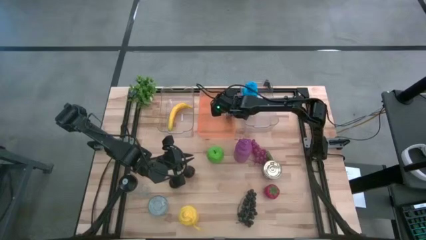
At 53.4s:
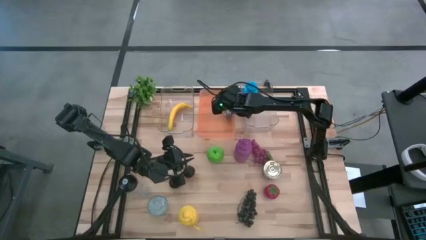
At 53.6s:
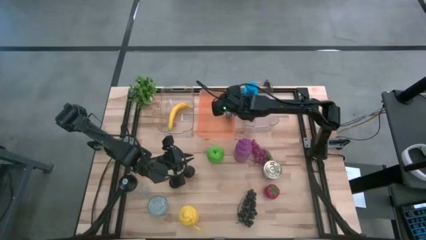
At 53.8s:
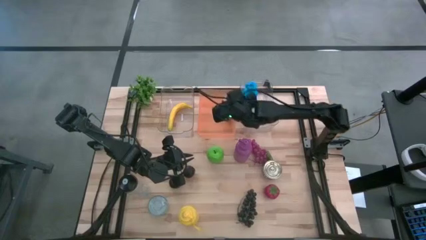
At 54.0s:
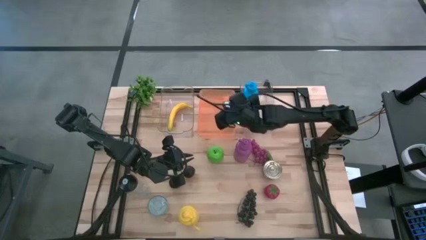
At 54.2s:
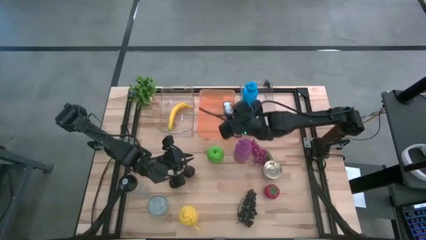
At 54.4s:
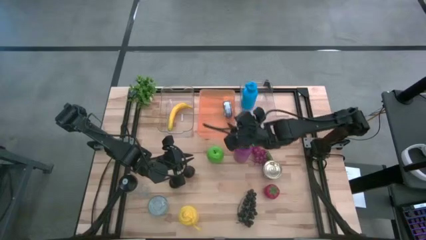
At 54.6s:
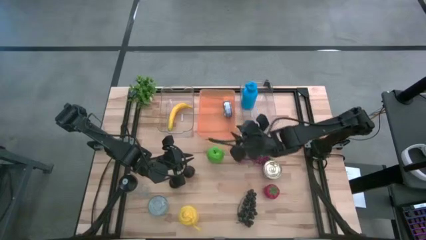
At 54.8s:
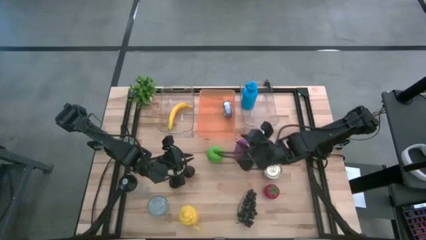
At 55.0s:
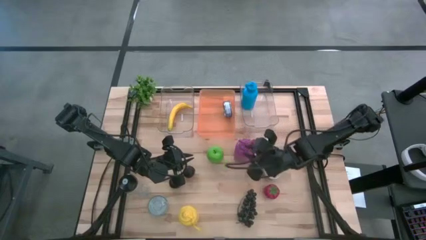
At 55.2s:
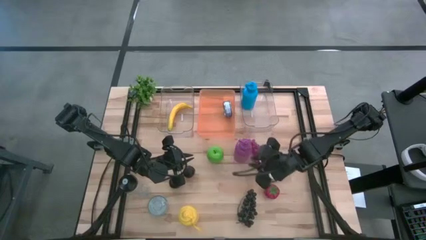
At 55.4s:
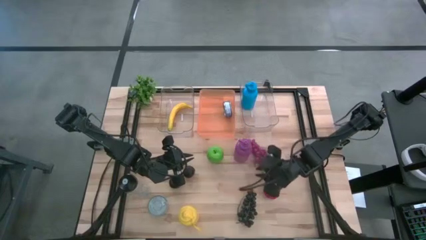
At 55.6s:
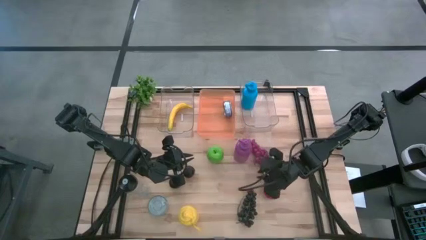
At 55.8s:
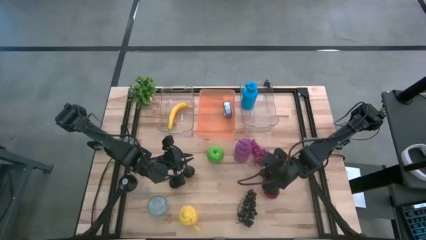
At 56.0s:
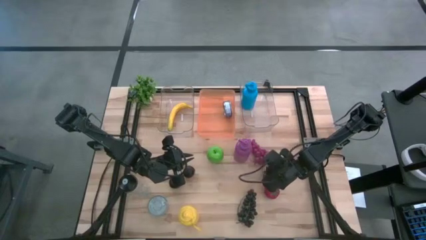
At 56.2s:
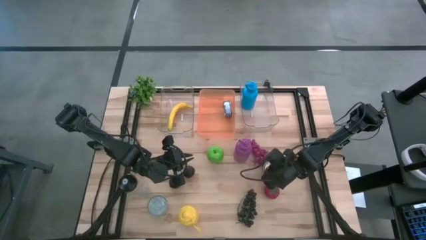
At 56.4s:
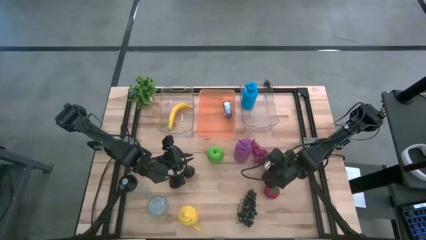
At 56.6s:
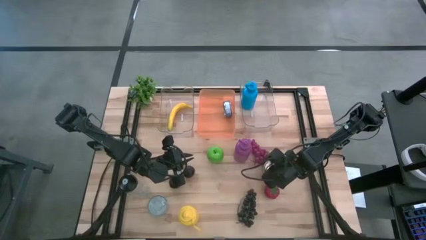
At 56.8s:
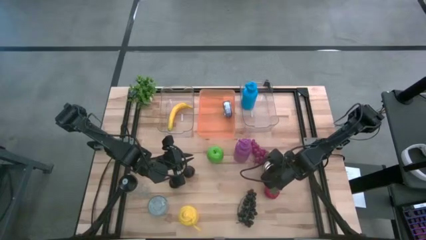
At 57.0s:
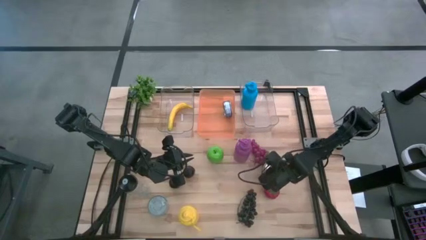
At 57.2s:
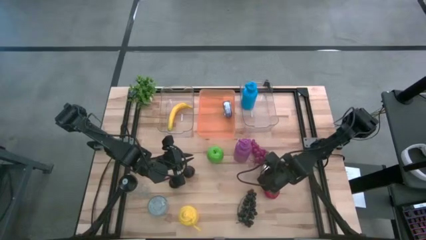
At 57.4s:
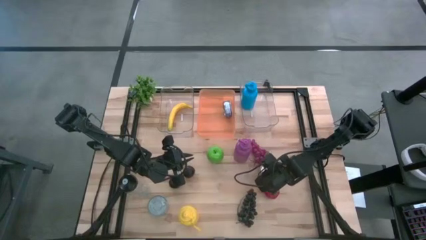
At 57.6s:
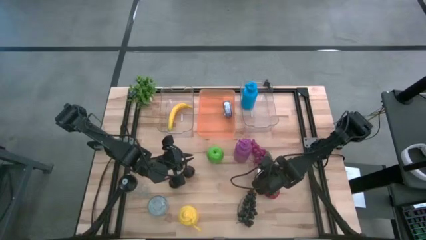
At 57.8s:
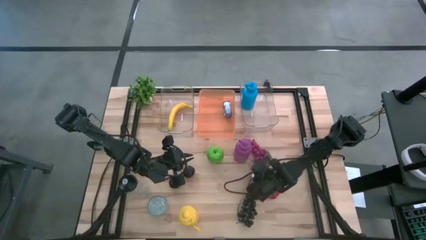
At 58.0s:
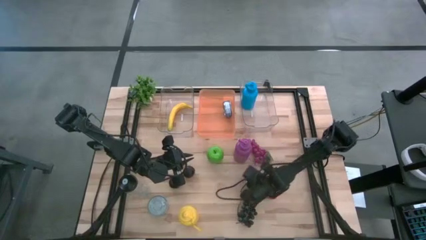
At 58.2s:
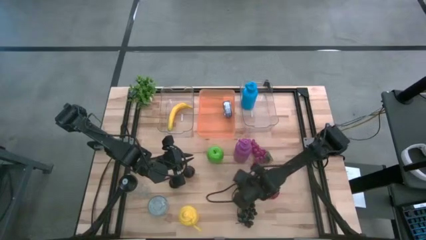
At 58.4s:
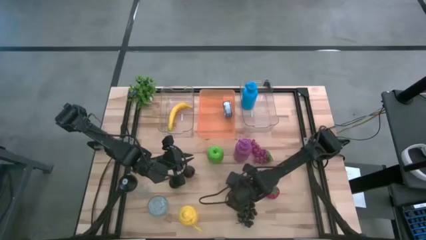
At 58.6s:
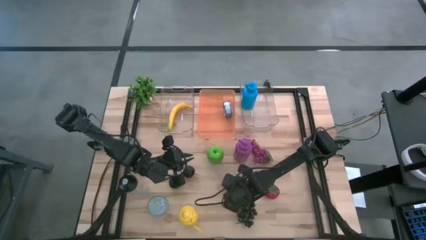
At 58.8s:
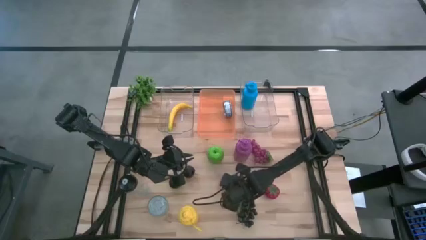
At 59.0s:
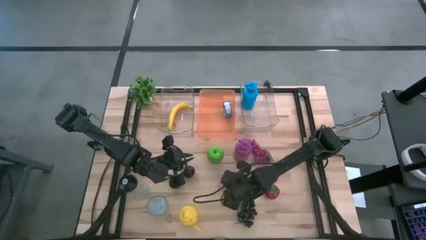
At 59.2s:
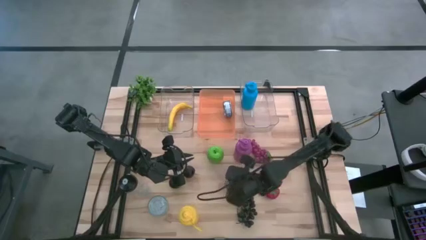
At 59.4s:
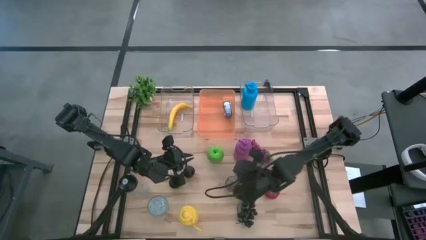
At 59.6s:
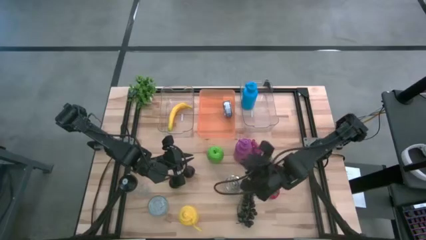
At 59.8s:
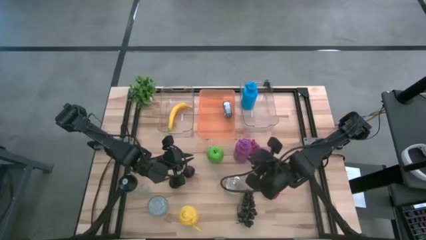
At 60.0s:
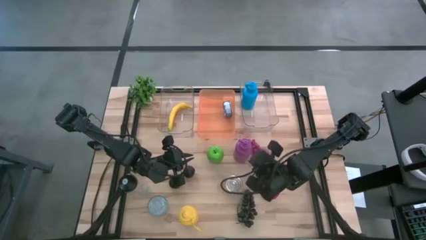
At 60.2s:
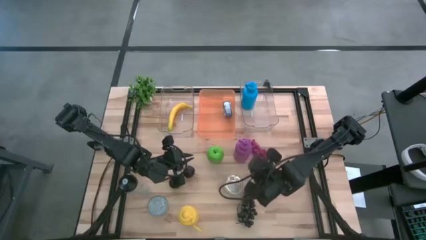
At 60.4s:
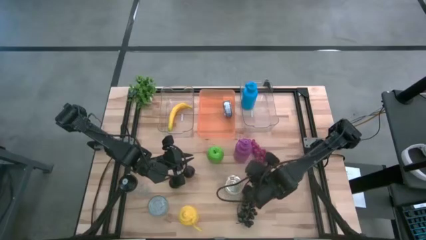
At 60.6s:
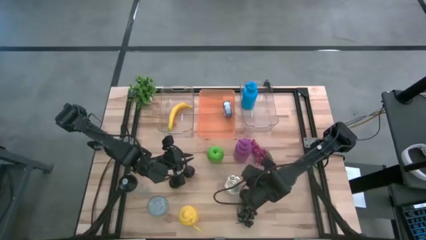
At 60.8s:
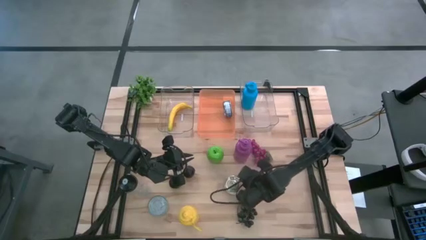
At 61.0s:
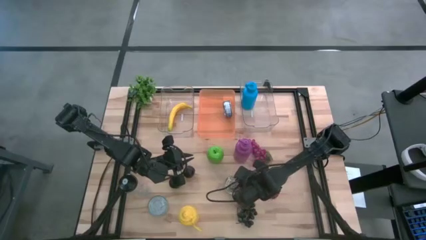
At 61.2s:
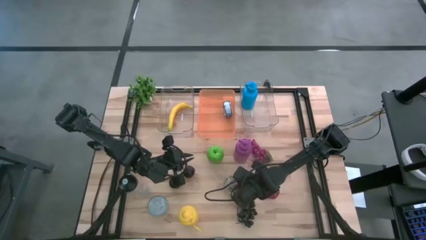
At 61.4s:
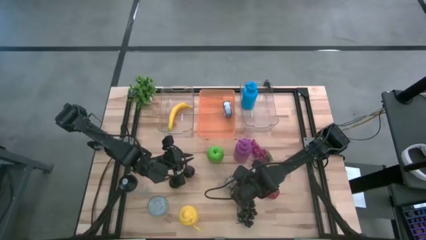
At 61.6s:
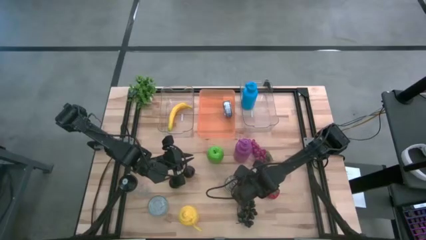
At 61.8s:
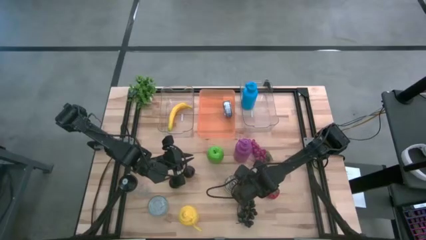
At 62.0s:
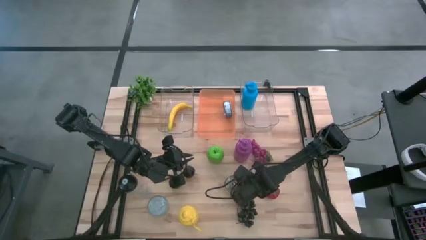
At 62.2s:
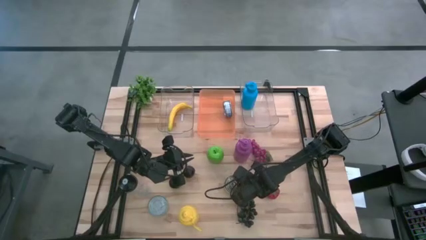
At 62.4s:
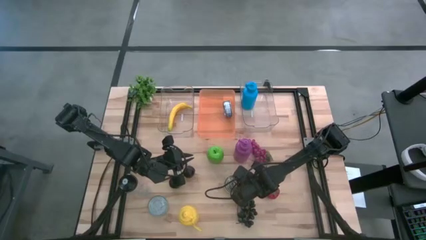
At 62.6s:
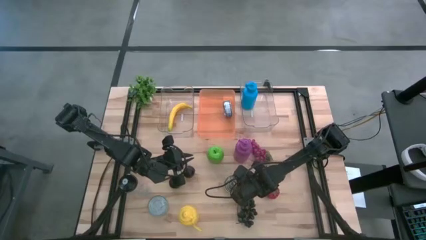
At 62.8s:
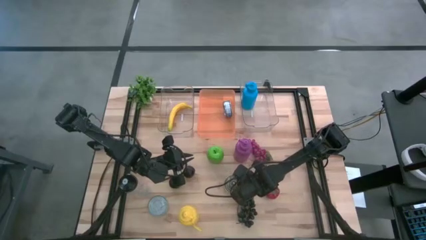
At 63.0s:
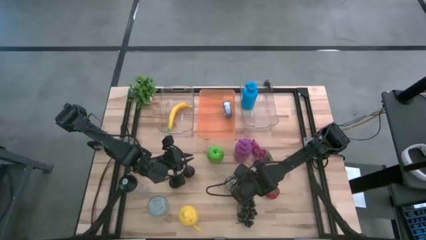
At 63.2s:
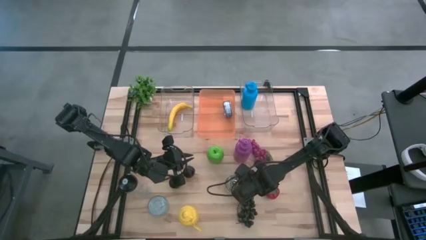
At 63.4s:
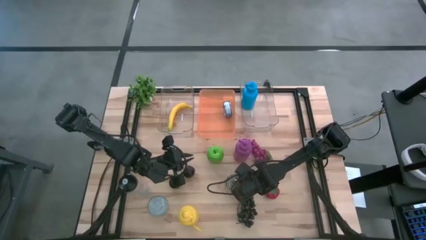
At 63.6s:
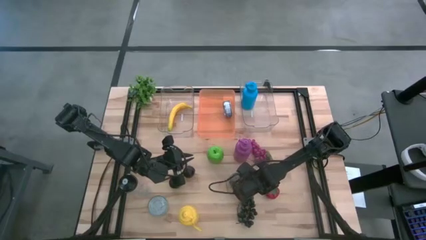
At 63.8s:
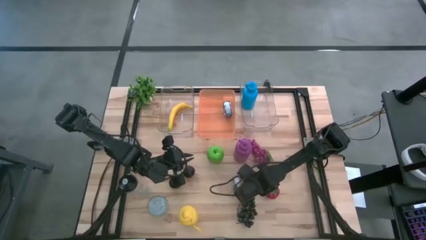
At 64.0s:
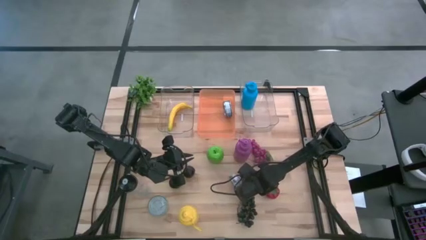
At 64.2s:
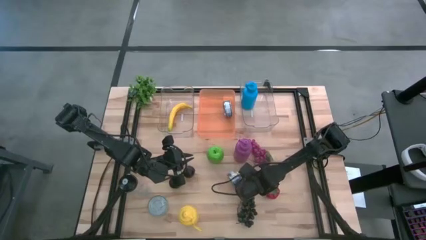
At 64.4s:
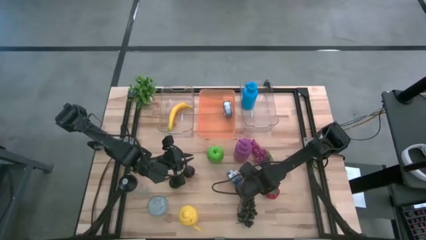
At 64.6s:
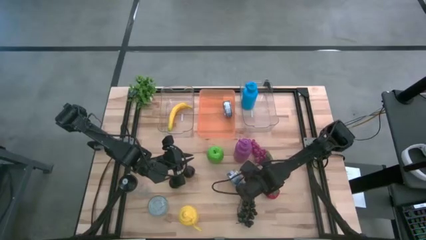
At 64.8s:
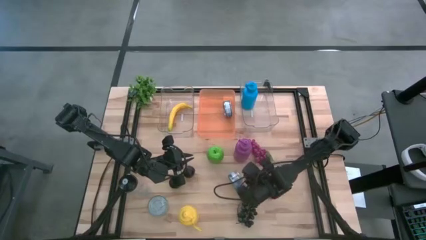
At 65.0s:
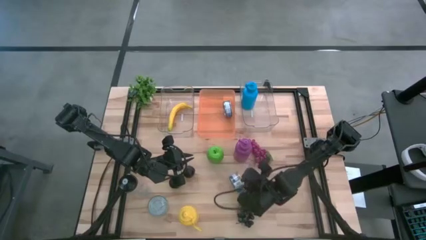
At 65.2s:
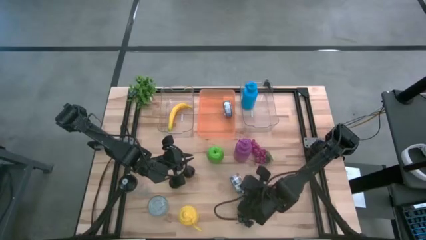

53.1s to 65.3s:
Task: Pick & Place Food Item
Put the blue and pink tuna can into the orange bin

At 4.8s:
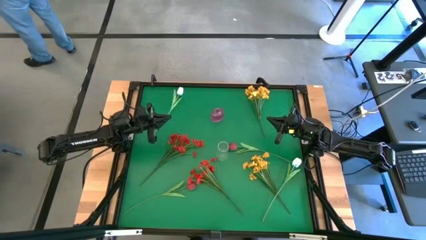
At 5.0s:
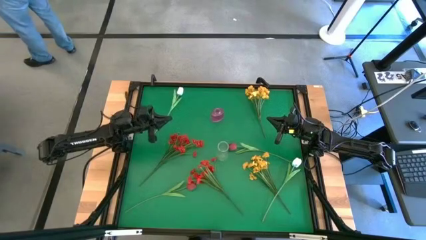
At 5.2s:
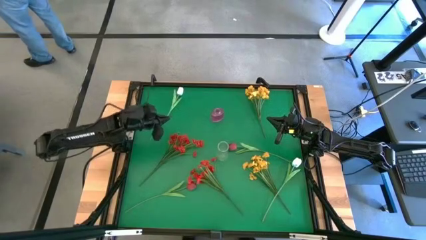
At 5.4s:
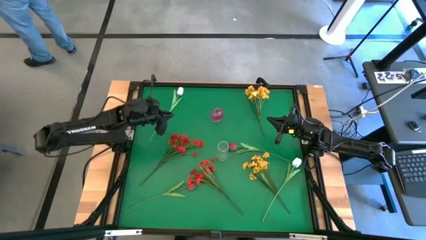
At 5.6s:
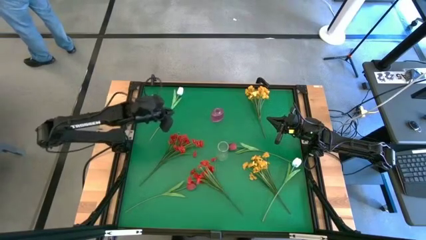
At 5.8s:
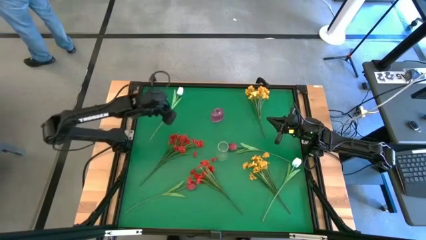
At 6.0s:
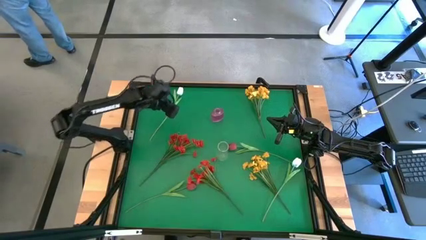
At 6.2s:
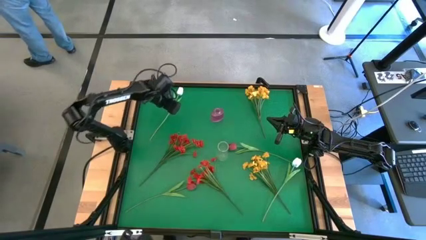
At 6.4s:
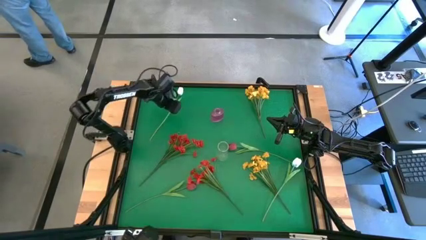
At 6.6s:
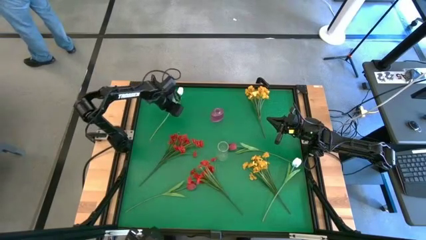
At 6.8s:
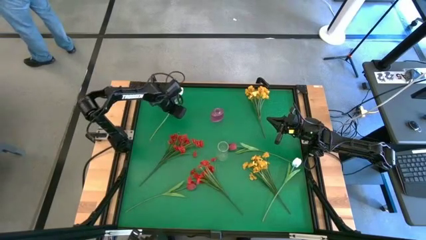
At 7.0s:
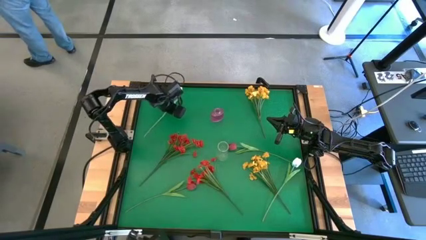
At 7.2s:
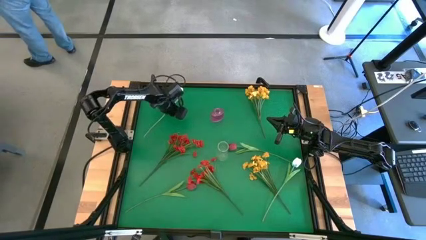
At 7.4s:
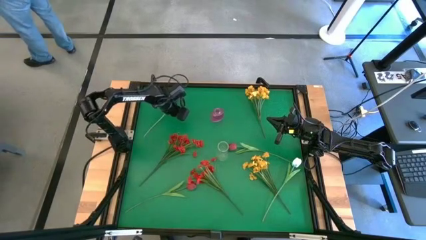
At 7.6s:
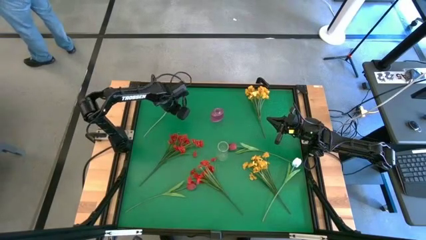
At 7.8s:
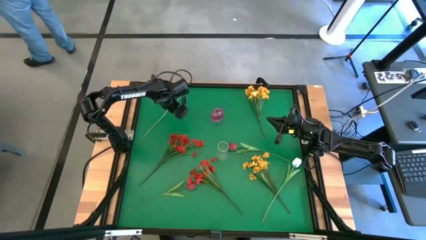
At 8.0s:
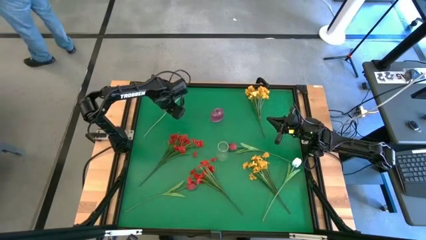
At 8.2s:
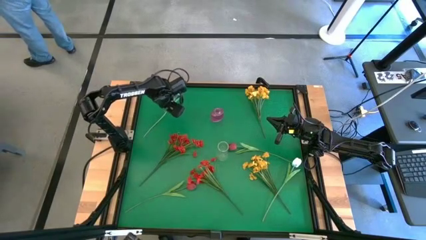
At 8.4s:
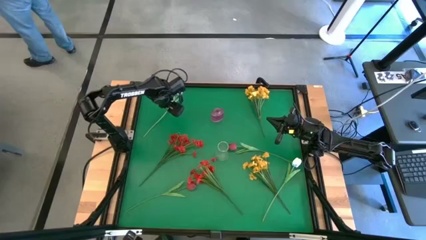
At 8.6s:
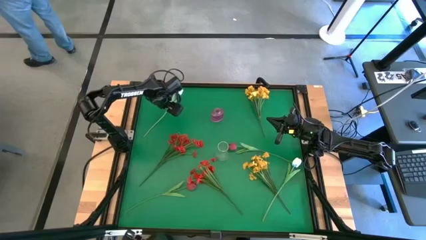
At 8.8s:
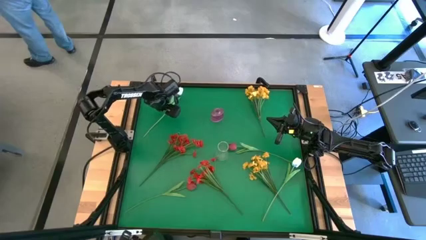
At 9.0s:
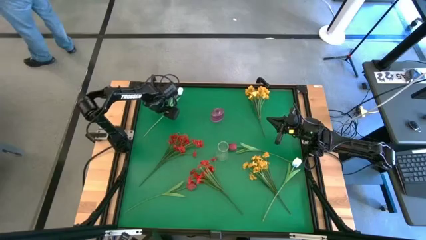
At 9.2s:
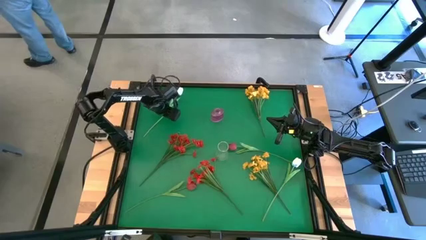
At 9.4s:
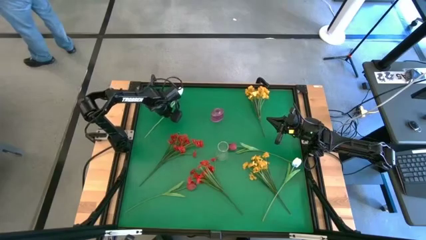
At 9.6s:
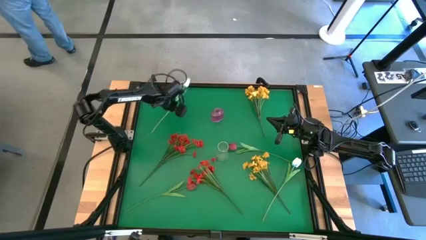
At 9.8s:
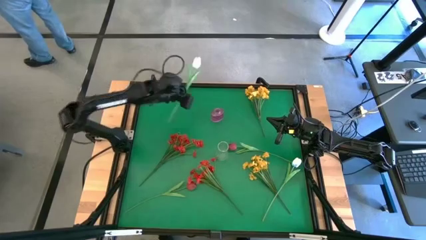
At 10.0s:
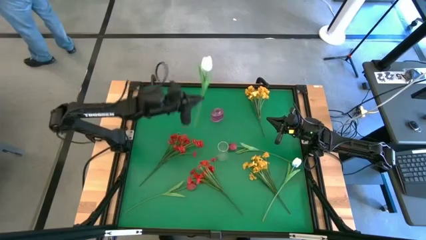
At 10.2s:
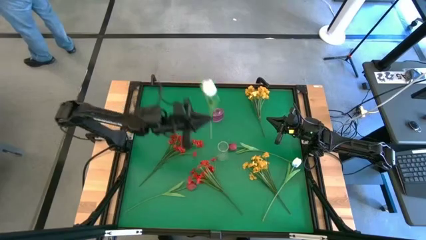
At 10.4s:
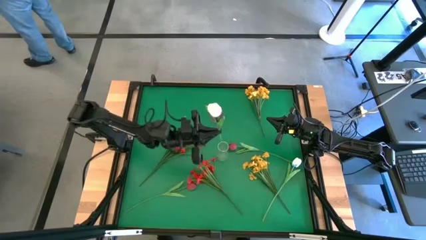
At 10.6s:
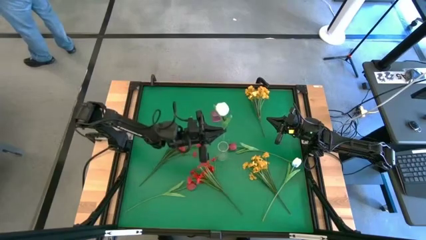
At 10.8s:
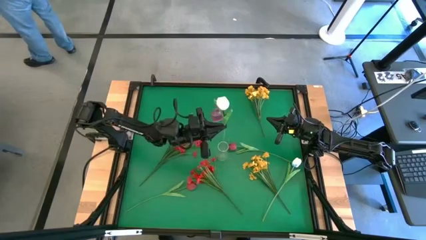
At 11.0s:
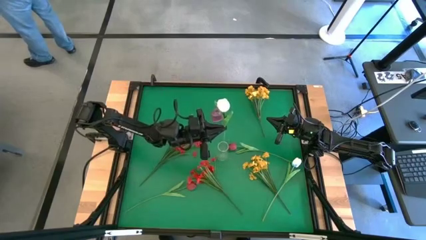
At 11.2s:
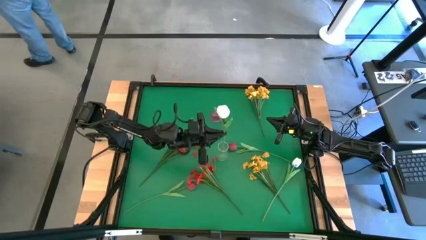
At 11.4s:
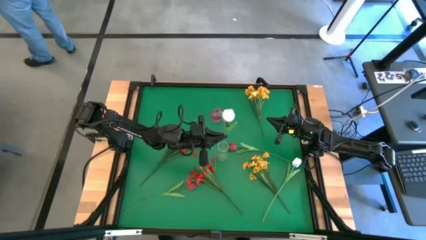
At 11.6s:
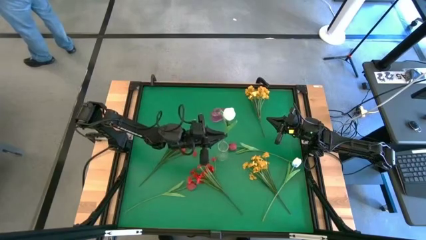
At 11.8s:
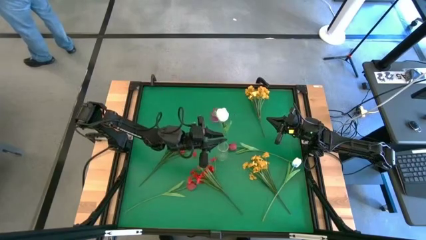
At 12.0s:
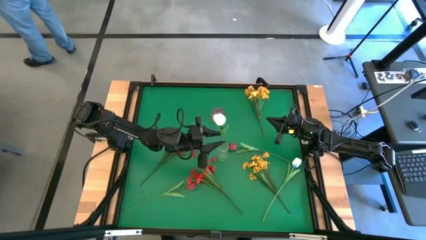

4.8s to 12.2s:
Task: Sort flowers into vase by color
Put the top white tulip into the transparent vase
